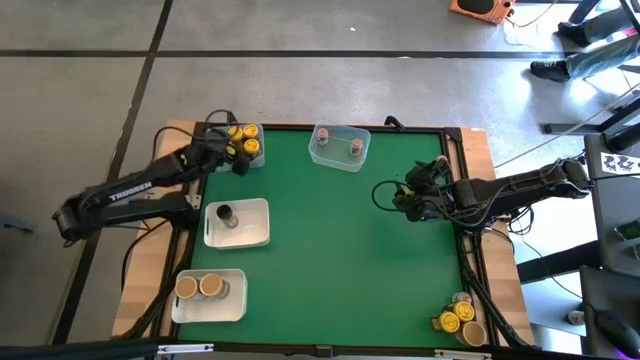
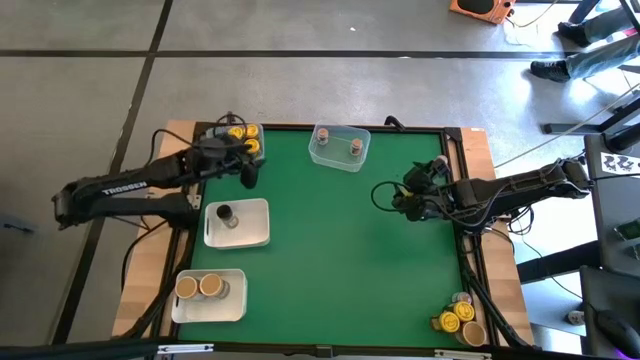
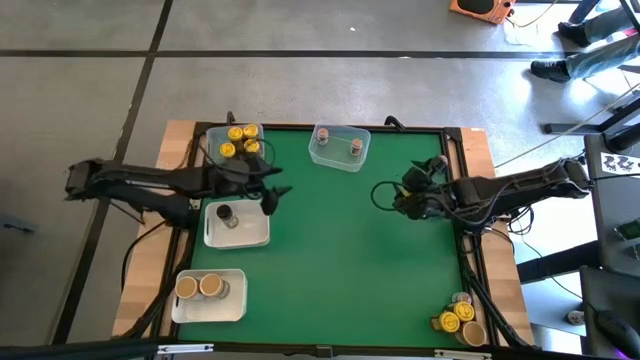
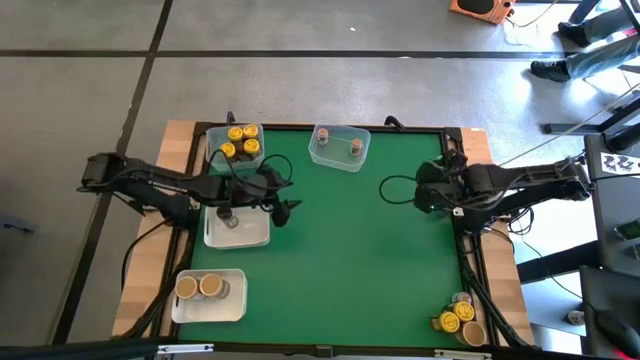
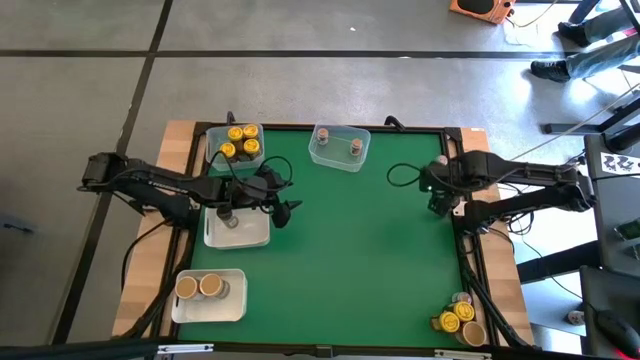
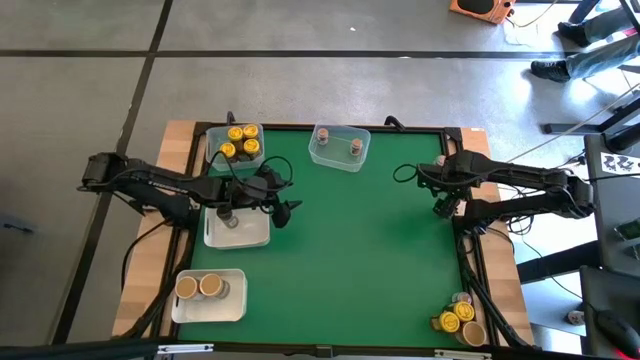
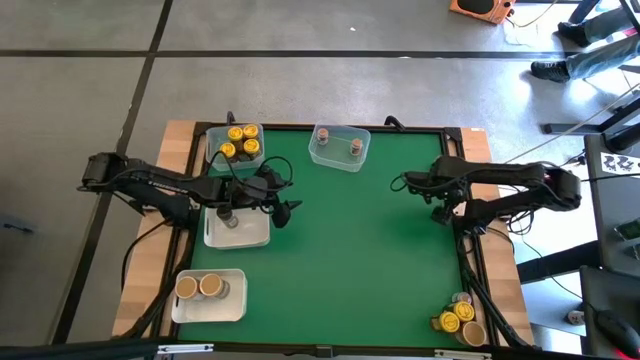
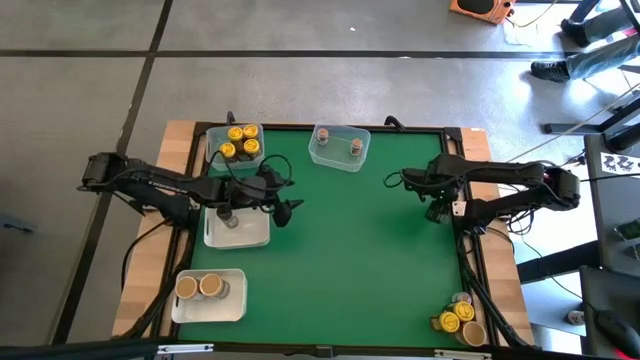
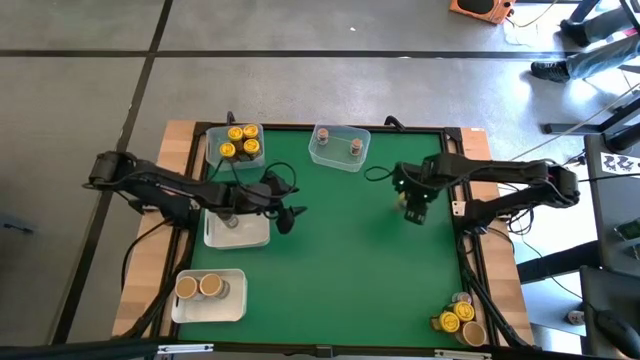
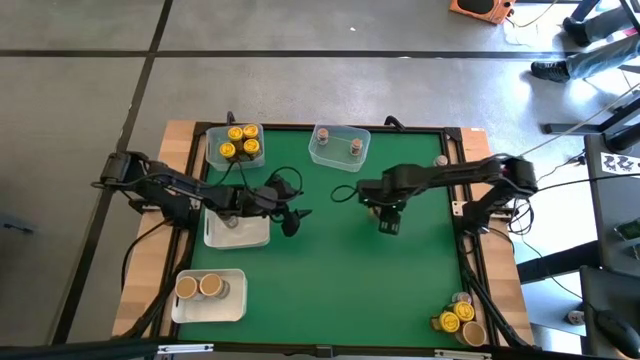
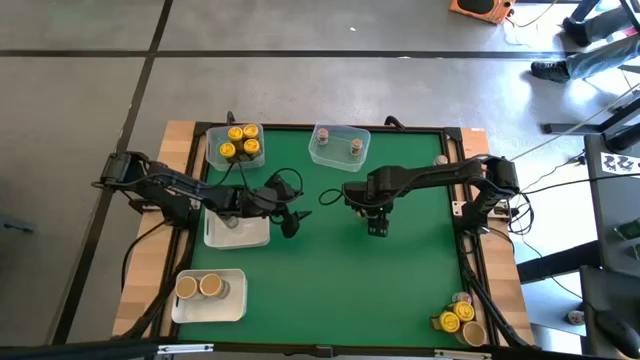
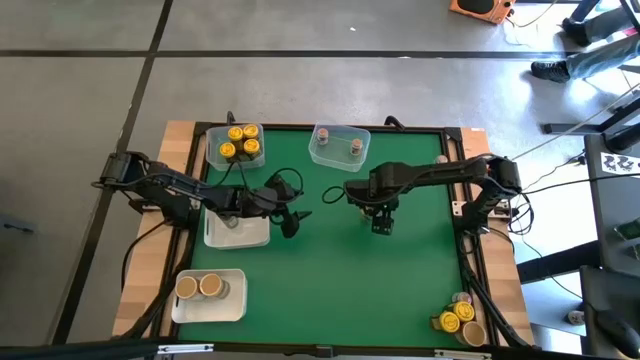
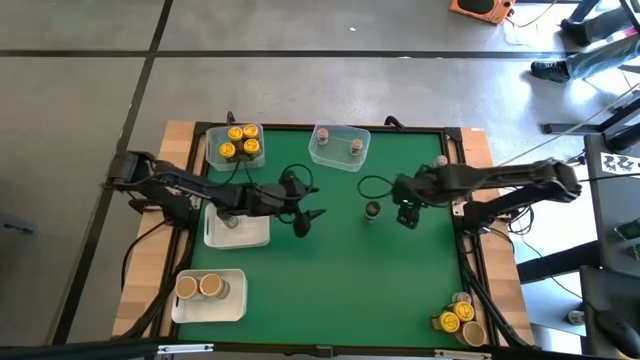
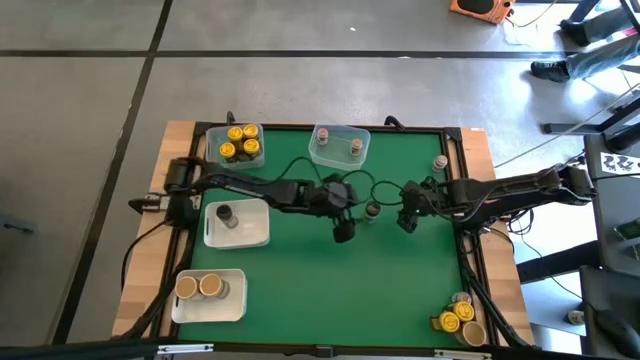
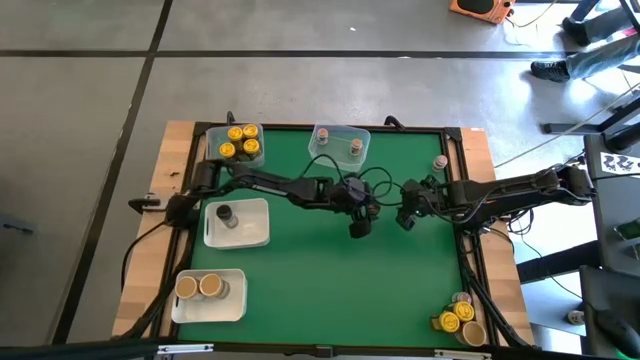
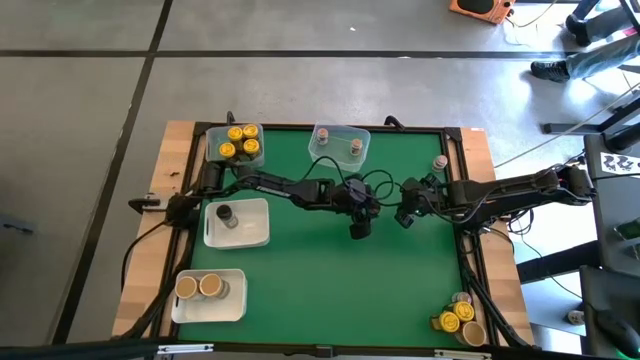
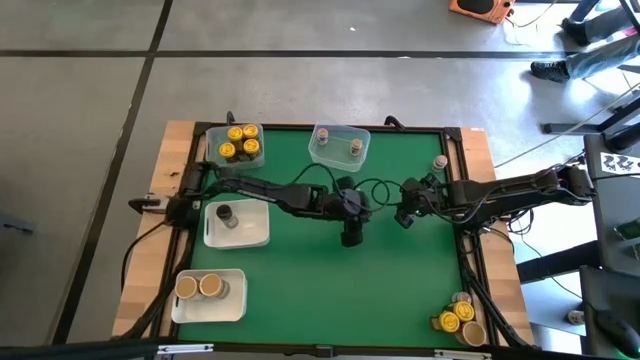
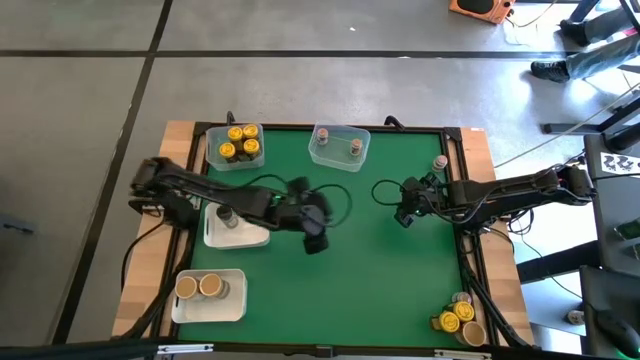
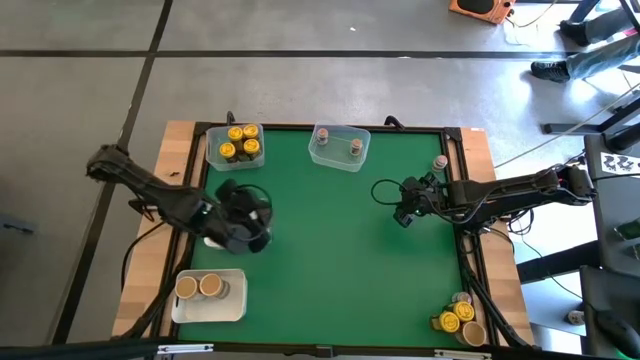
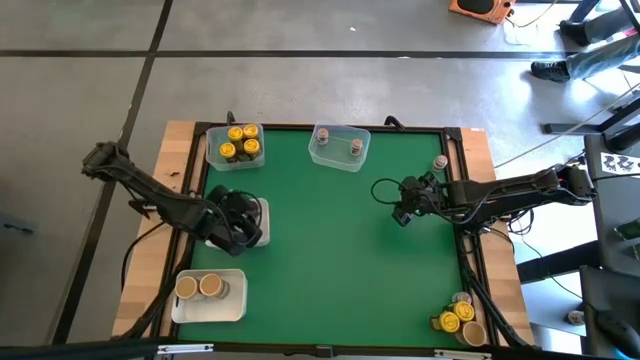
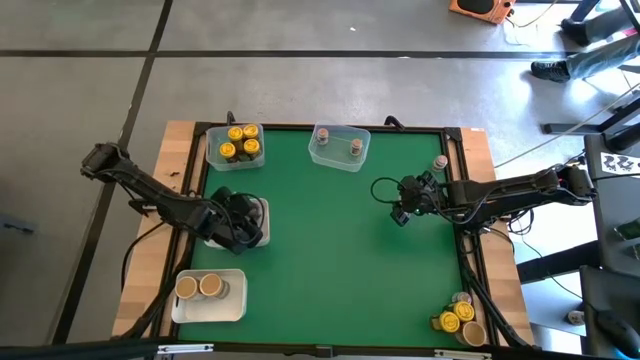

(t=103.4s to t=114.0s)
Task: Sort spices by type
Put the black seasoning bottle into the top white bin

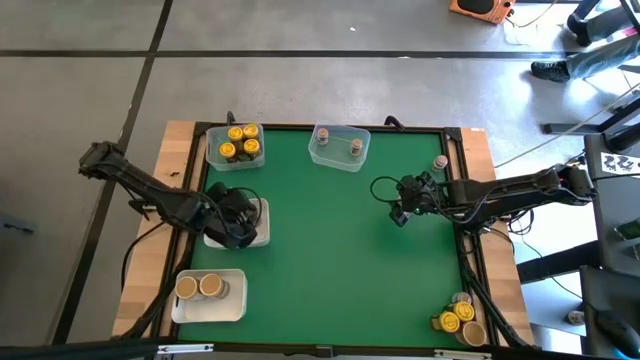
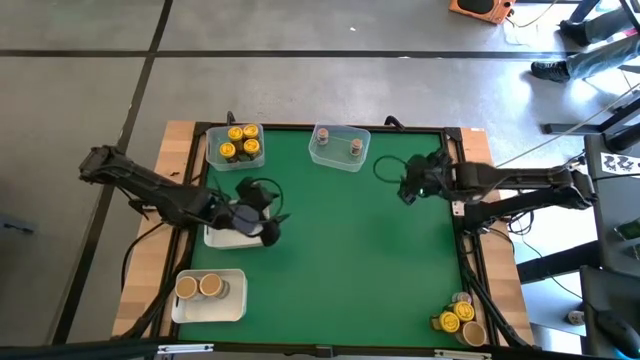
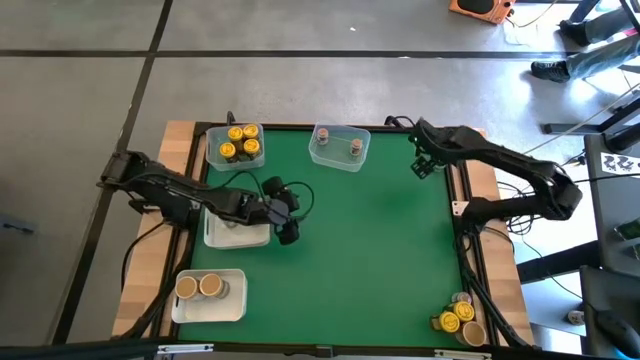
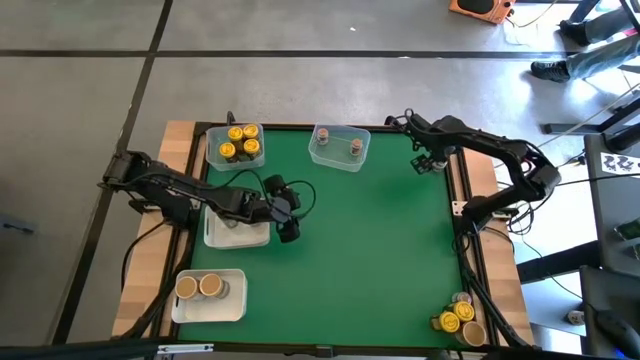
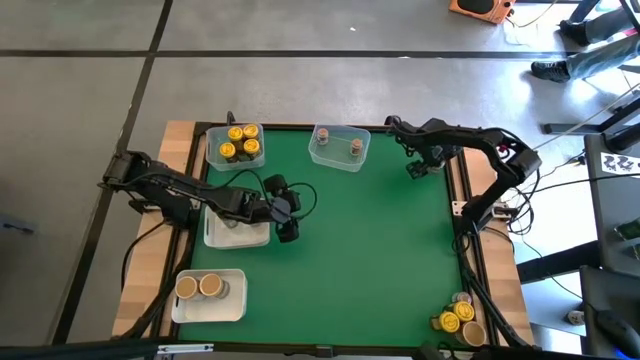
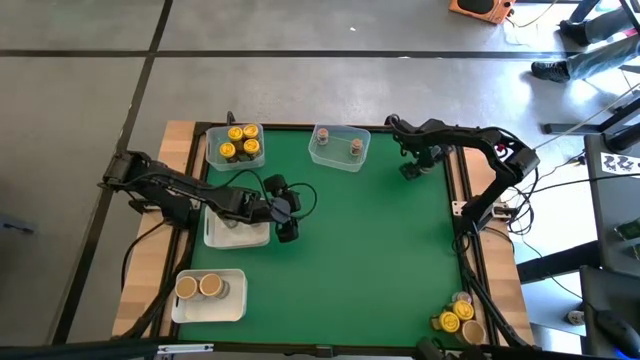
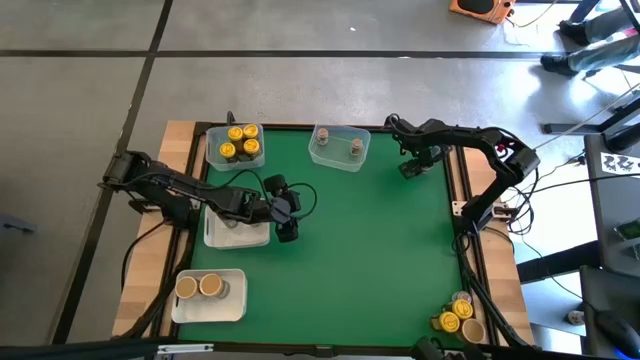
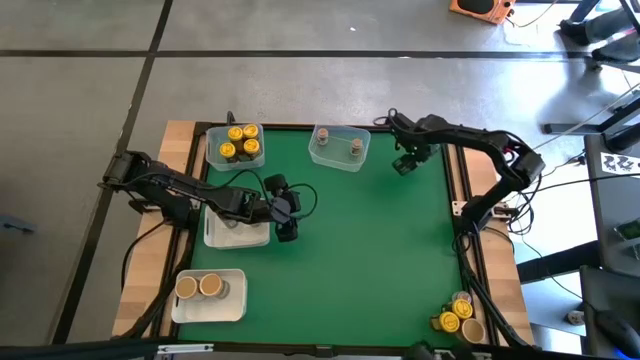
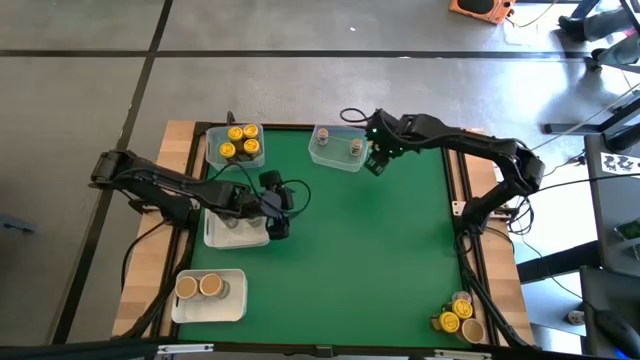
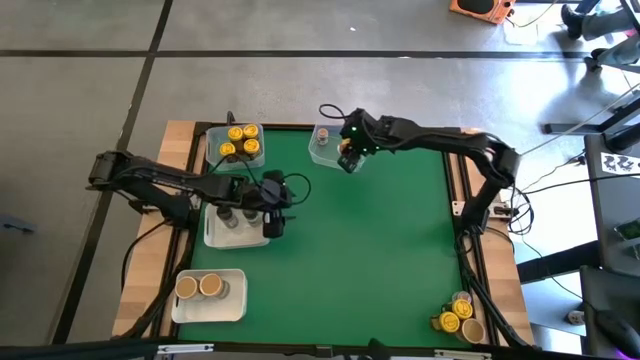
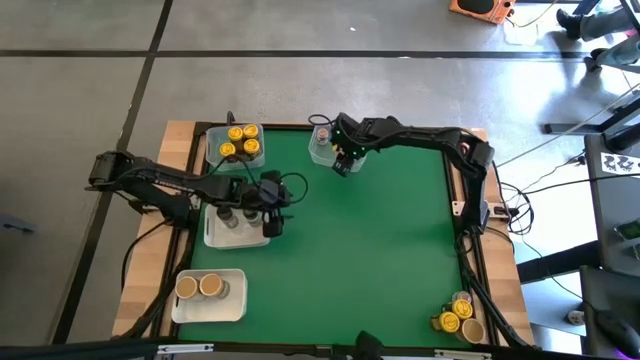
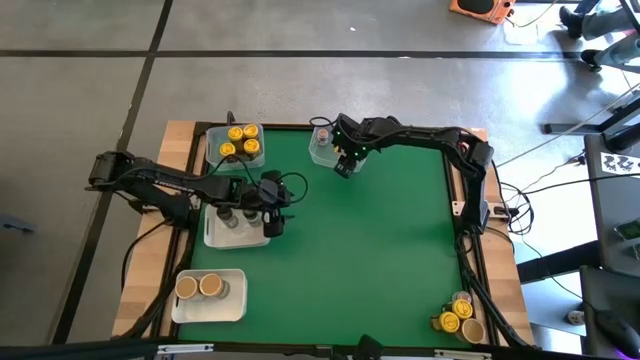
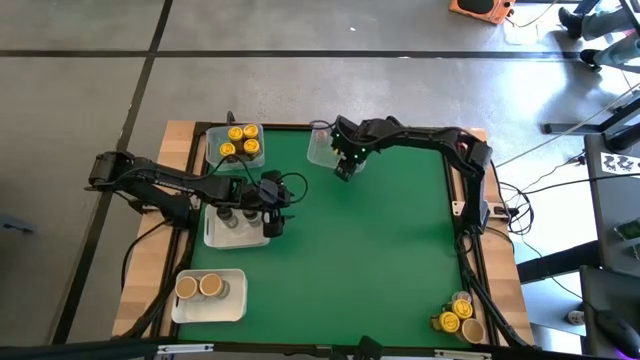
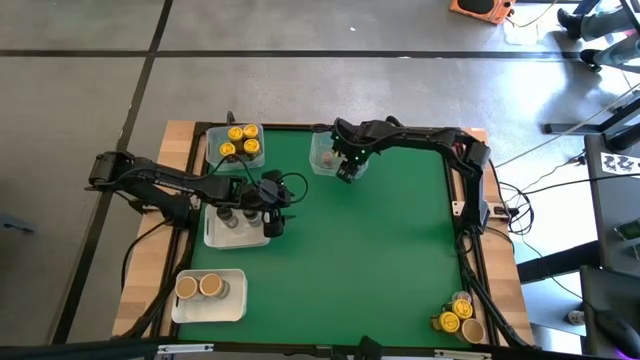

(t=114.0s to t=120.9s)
Put the brown seasoning bottle into the right transparent bin

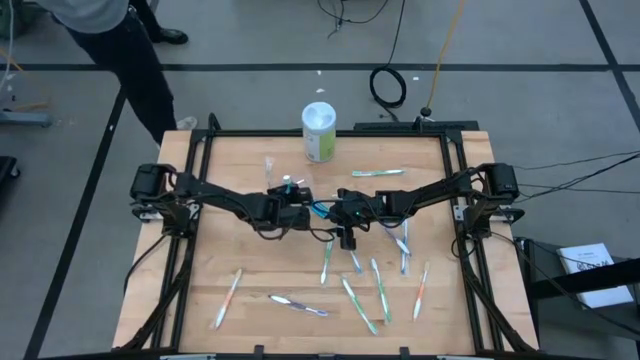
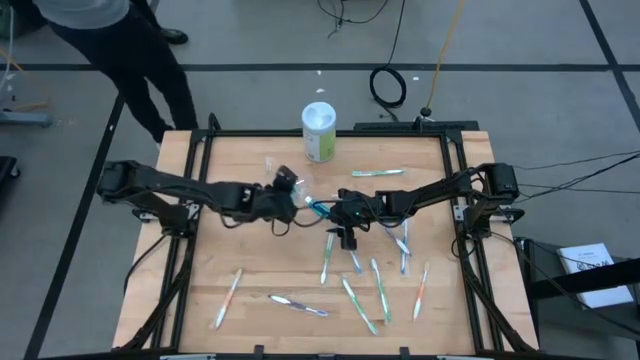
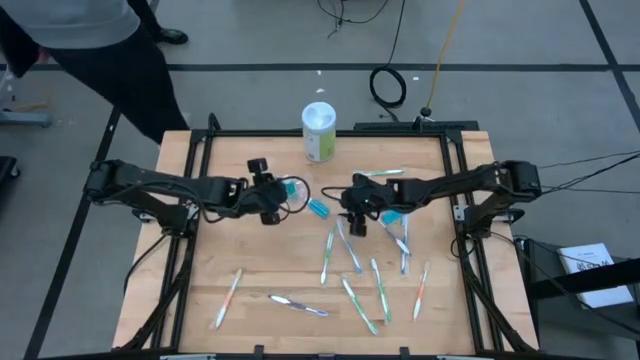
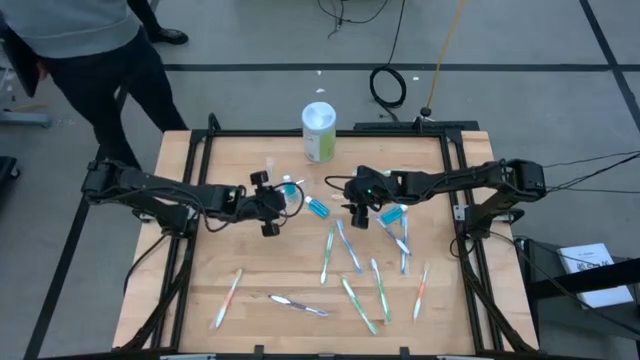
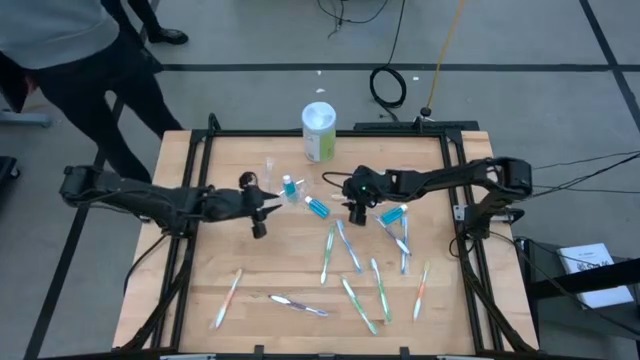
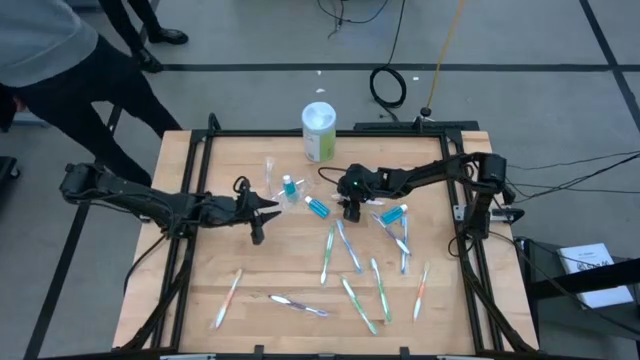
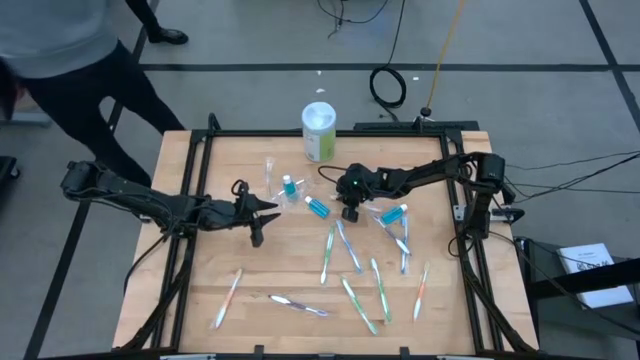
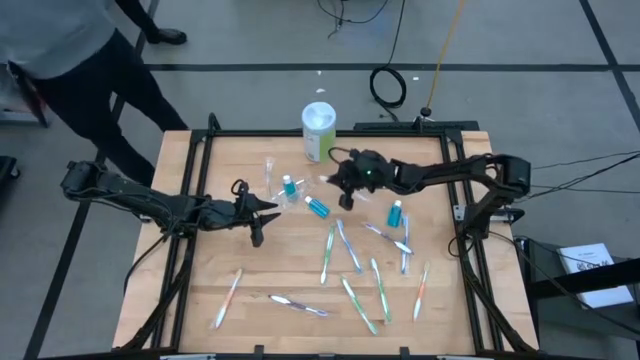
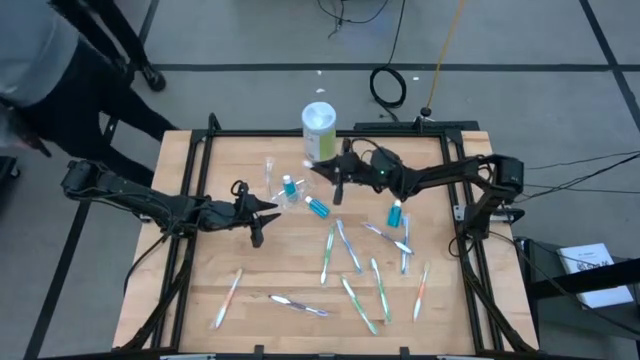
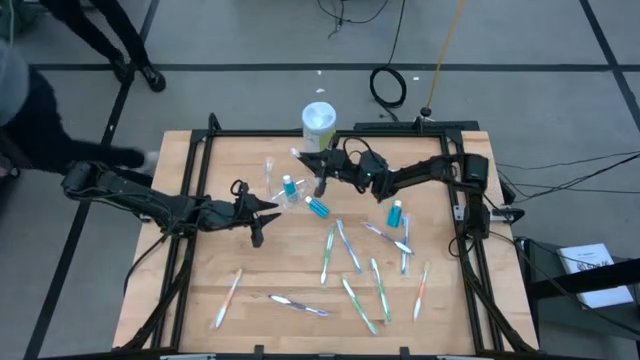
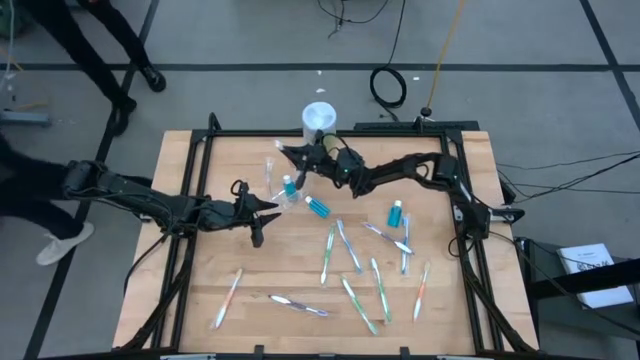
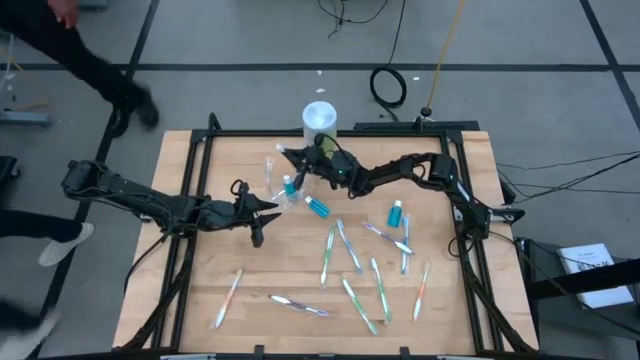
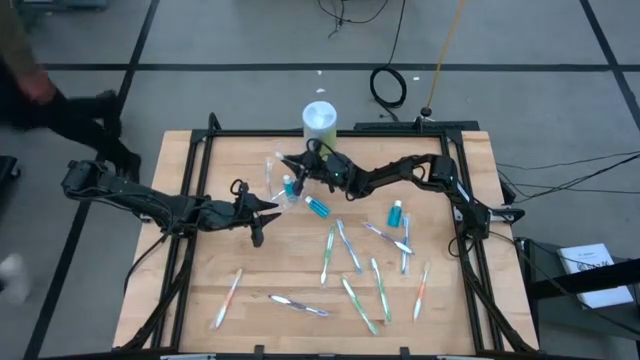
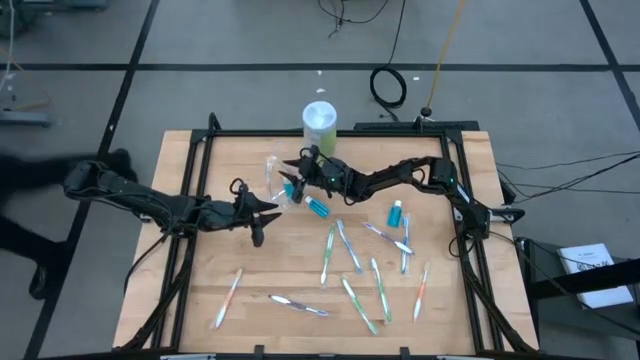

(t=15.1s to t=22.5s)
Task: Pick & Place toothbrushing station
Put the orange toothbrush into the transparent organizer
